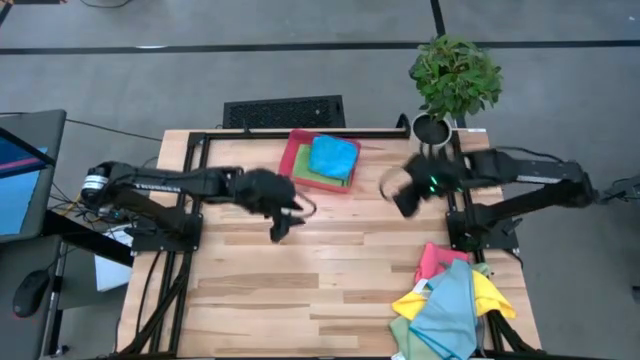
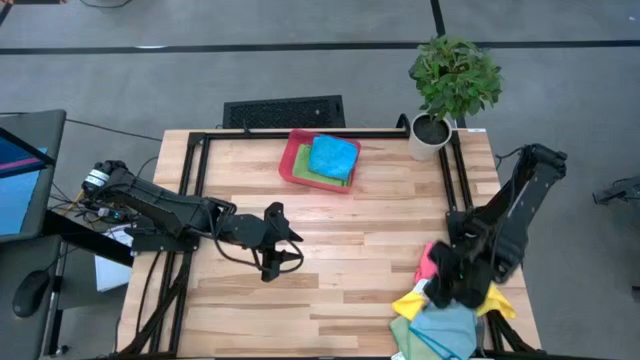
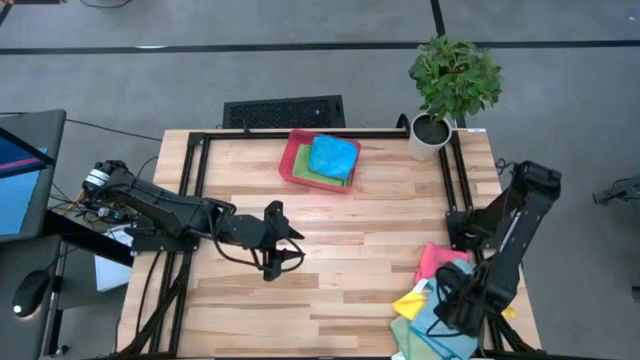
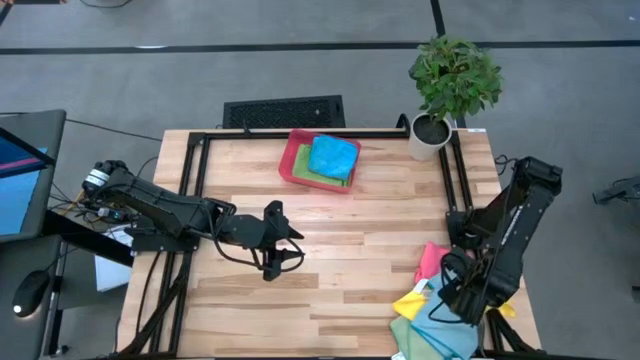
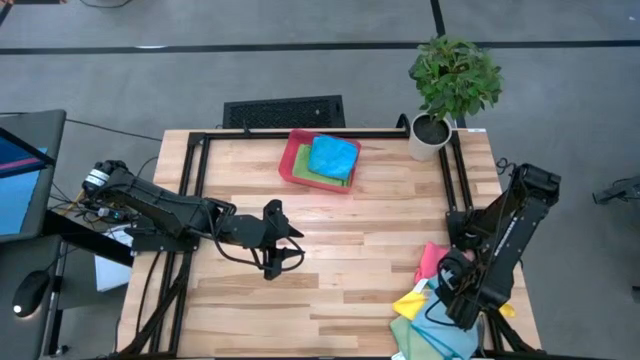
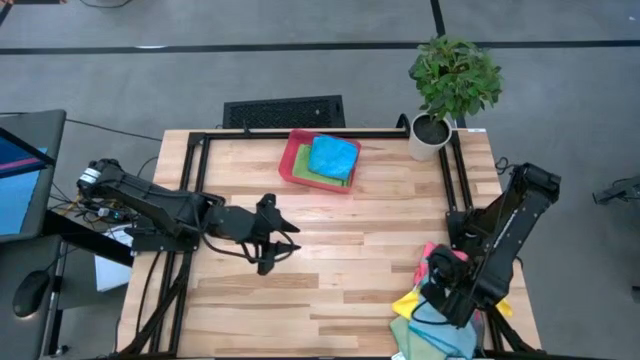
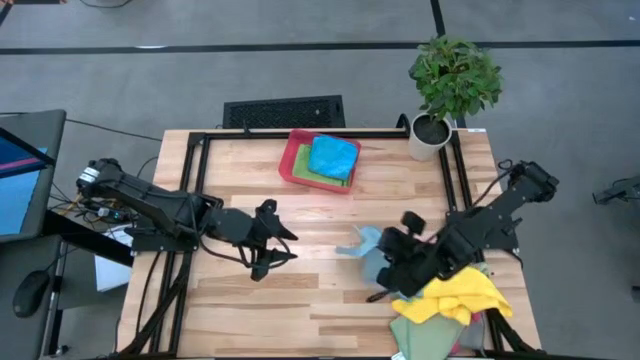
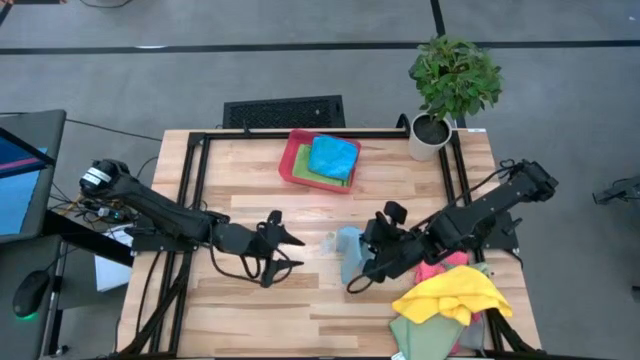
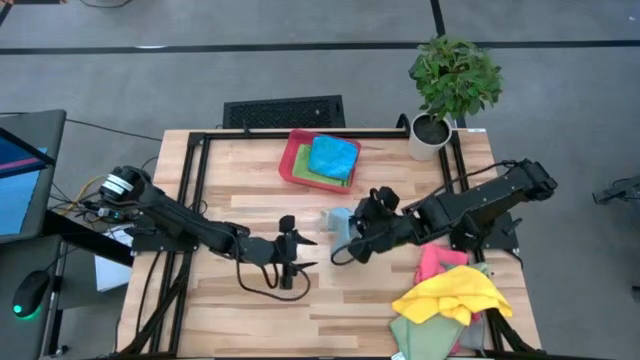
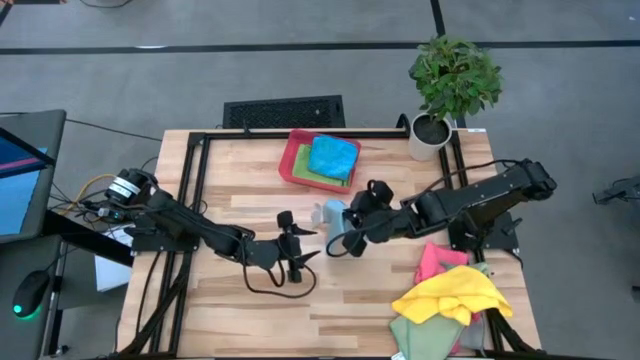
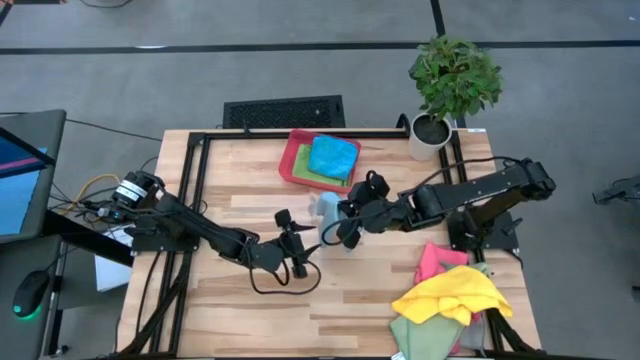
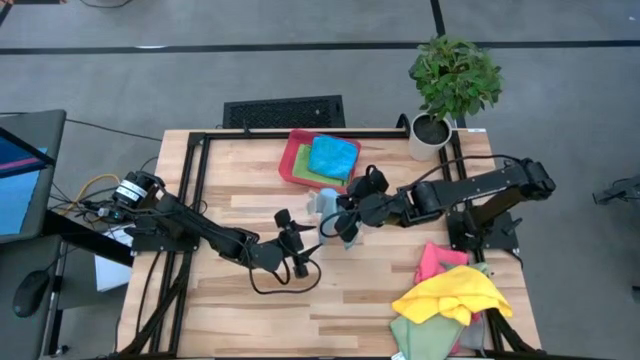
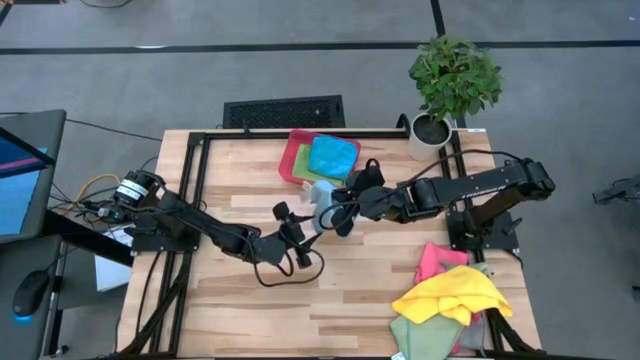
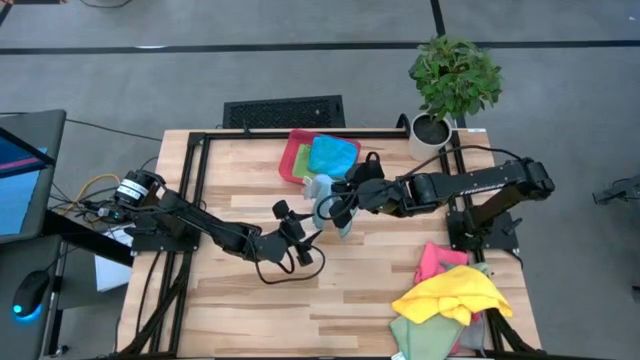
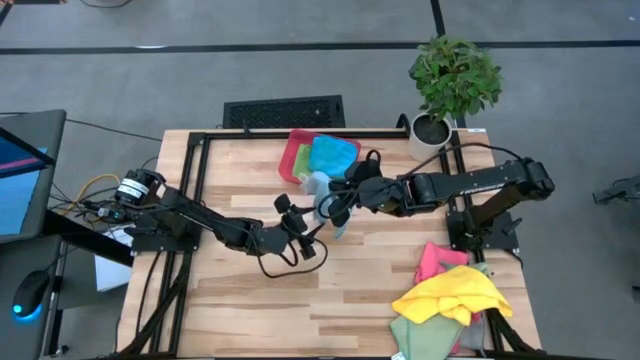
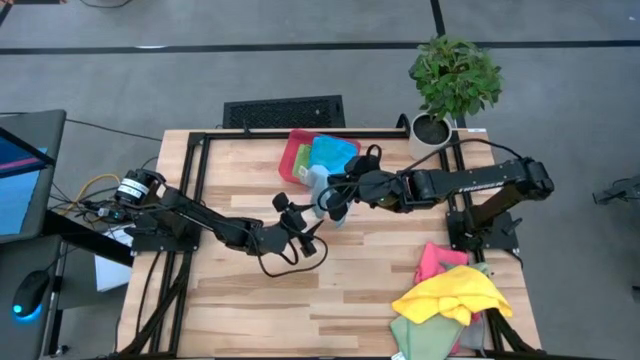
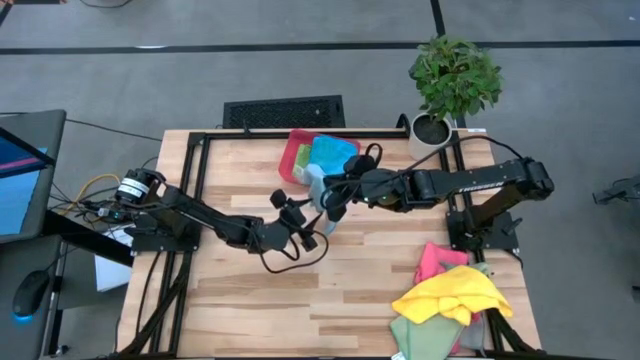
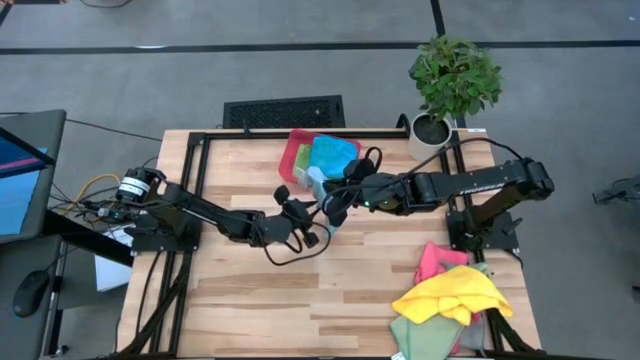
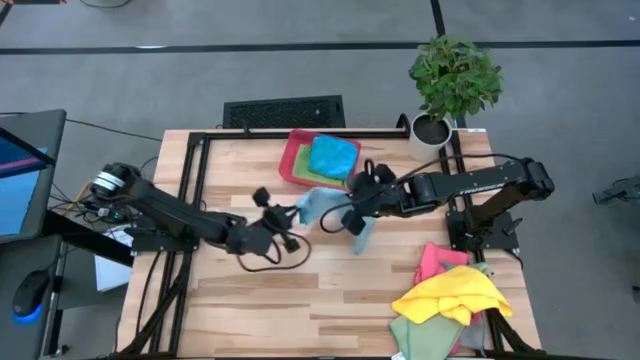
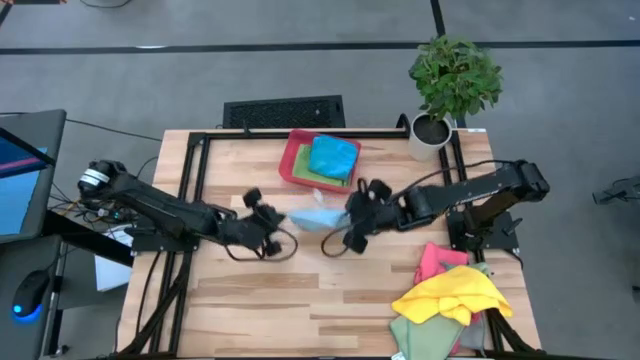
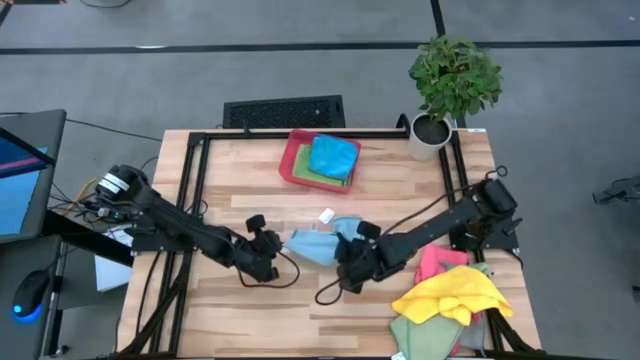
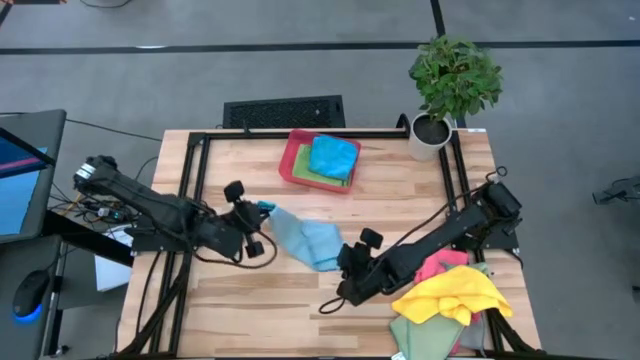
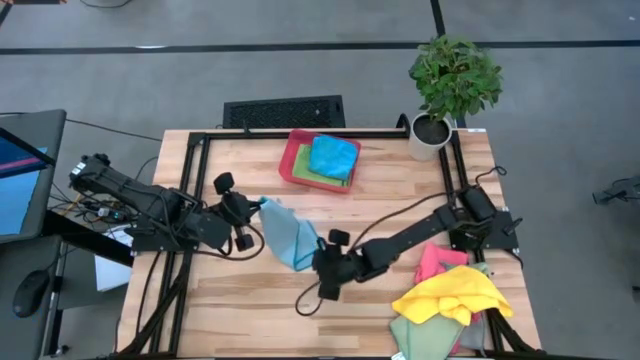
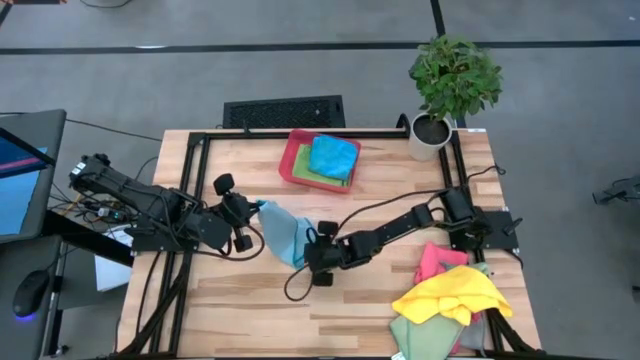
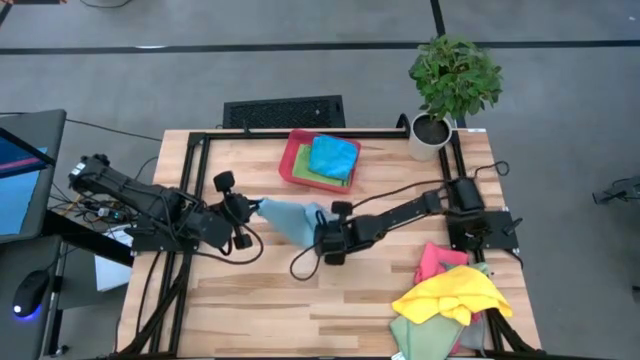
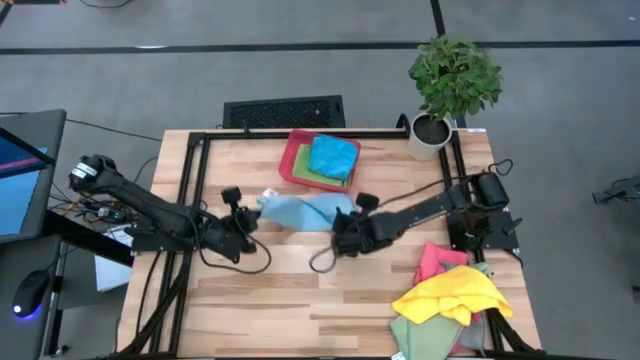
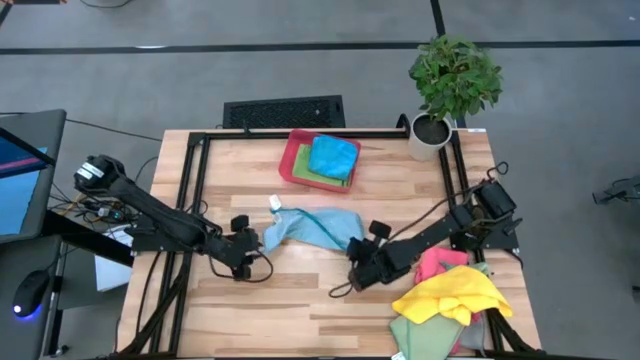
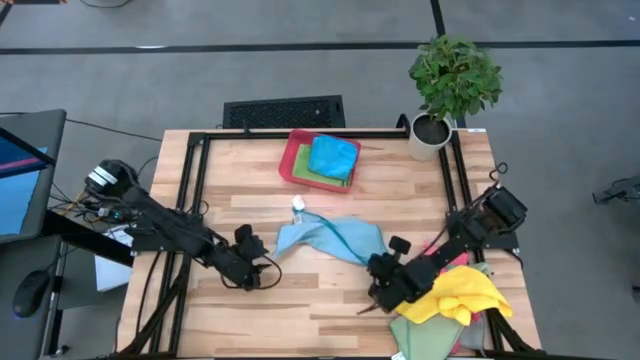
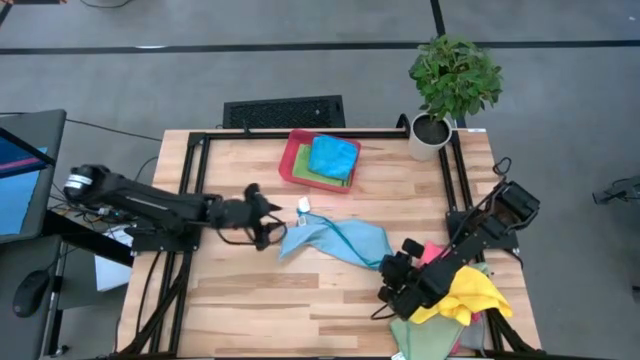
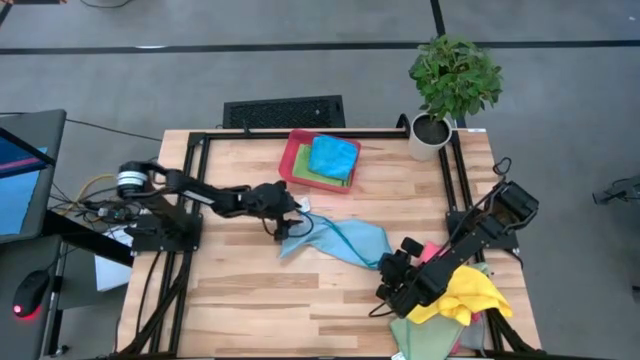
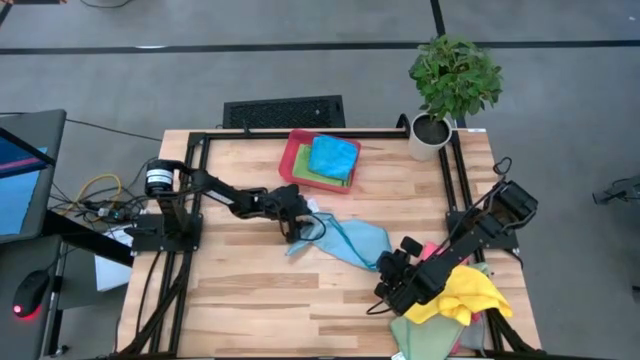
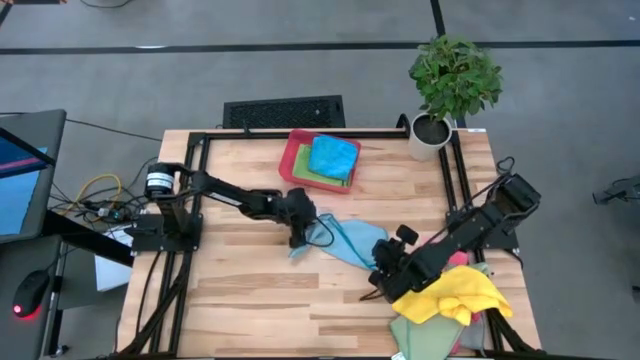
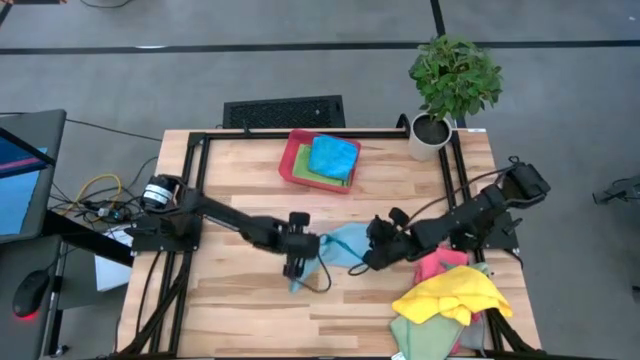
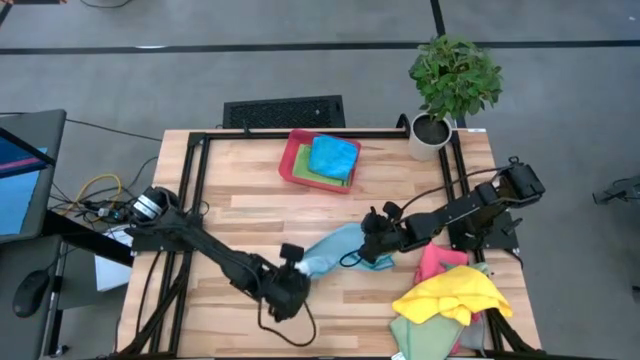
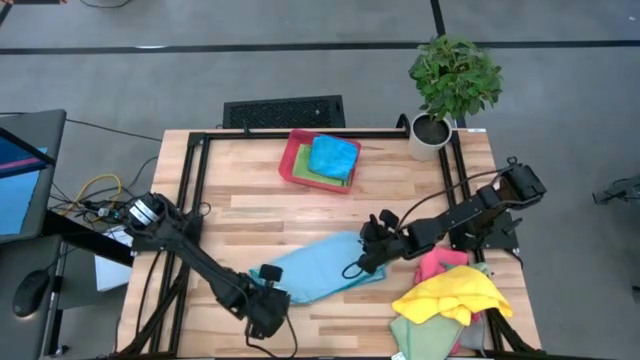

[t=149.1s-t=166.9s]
Task: Fold microfiber towels
Fold the light blue microfiber cloth

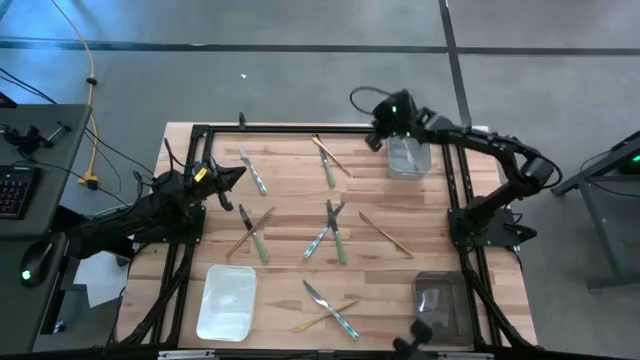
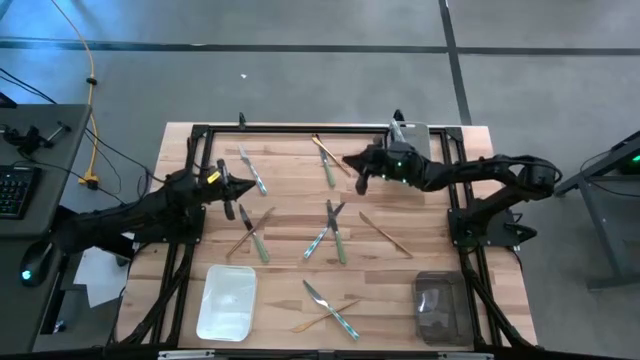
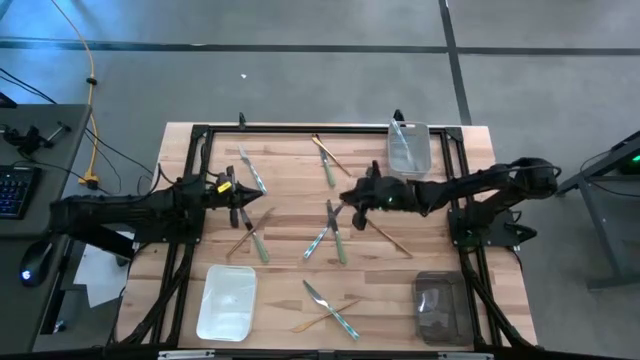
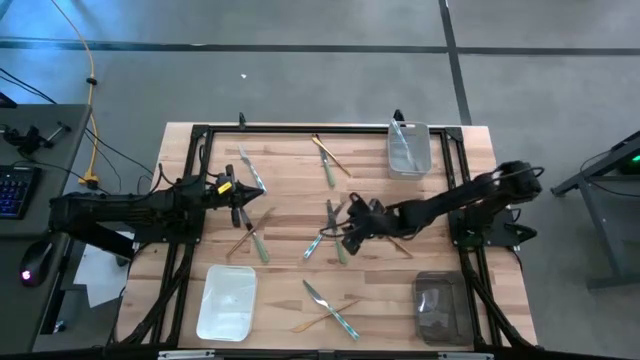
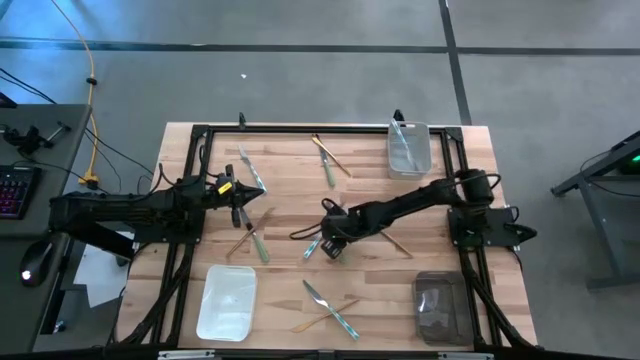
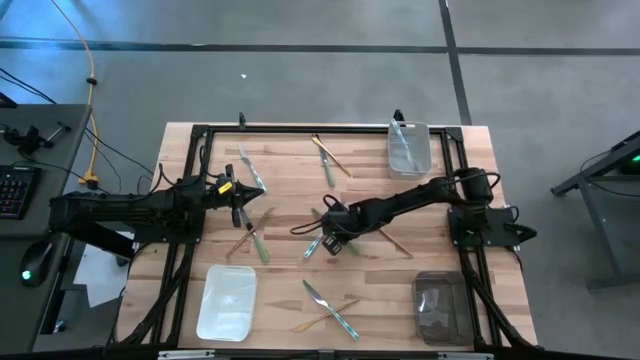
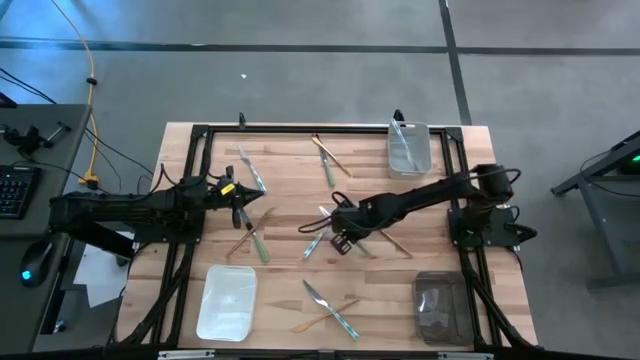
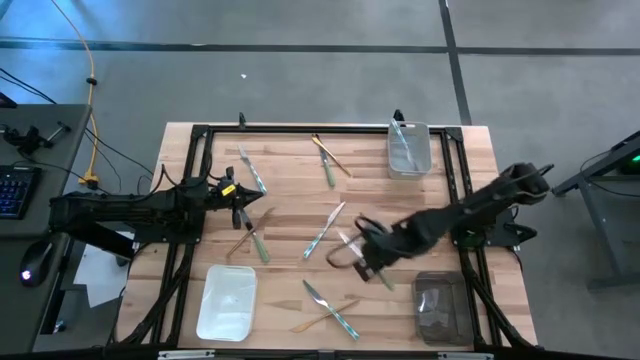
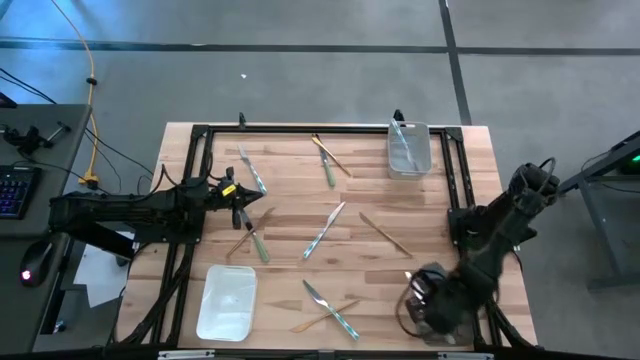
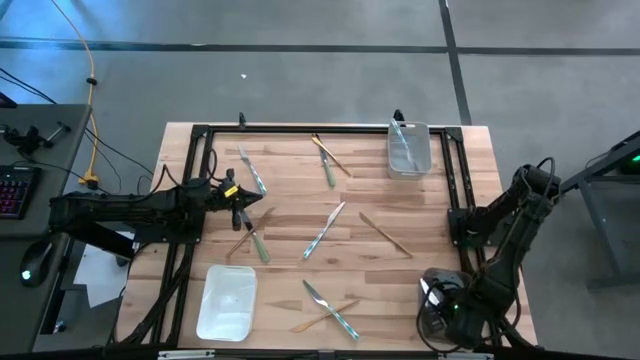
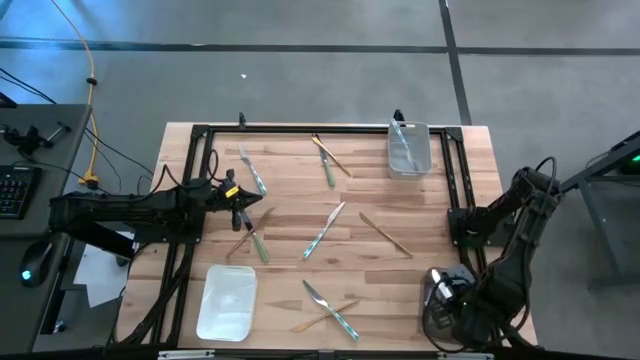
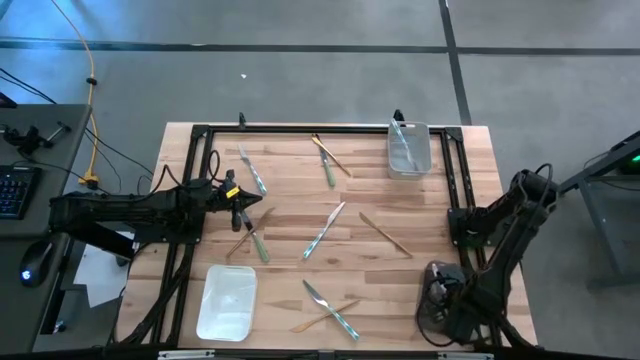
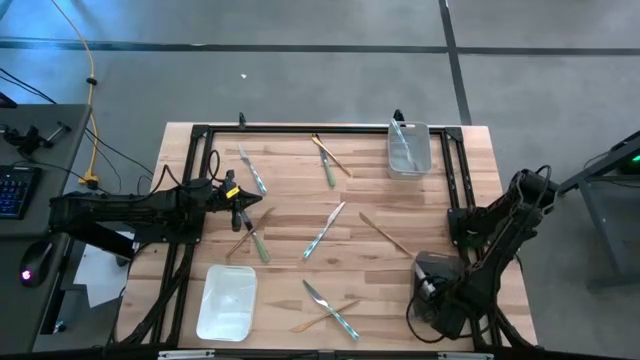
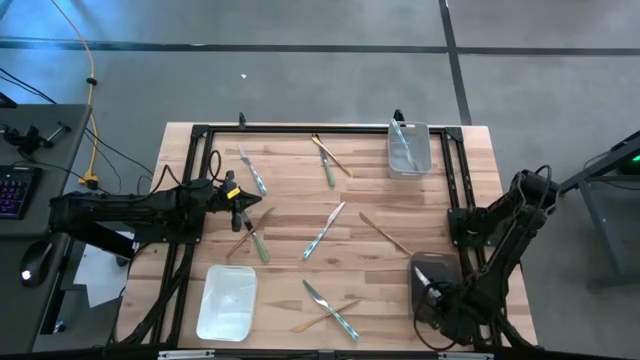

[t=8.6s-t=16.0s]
Task: Sort silverware by color (type)
Put the green table knife into the black bin
